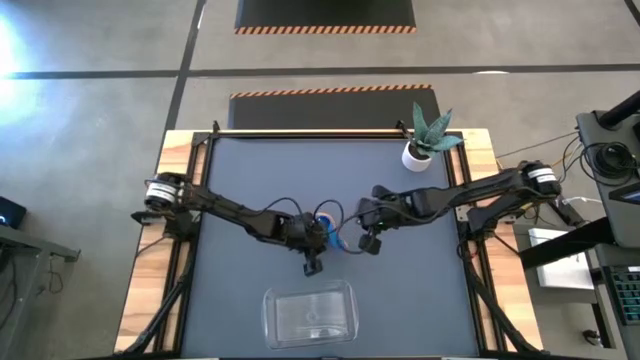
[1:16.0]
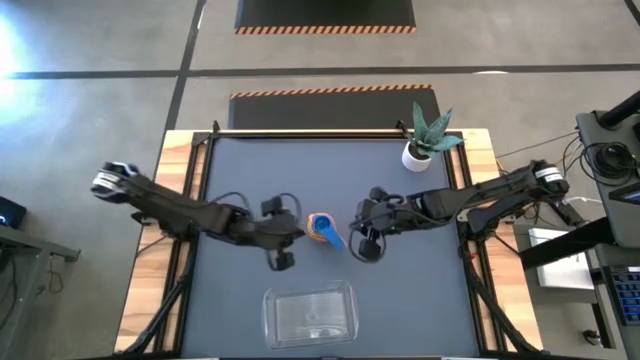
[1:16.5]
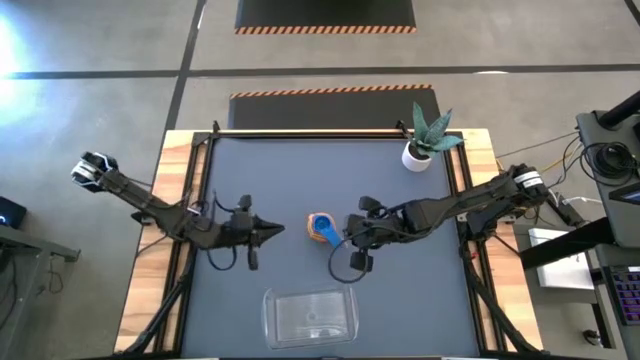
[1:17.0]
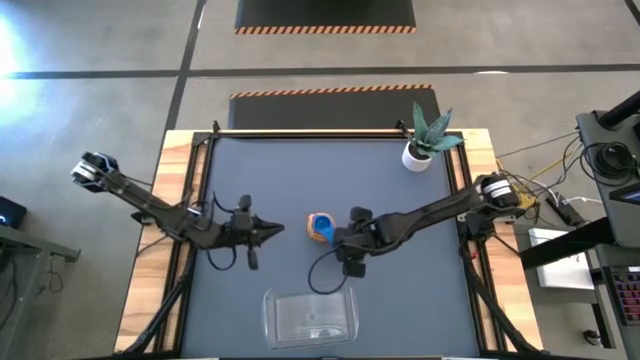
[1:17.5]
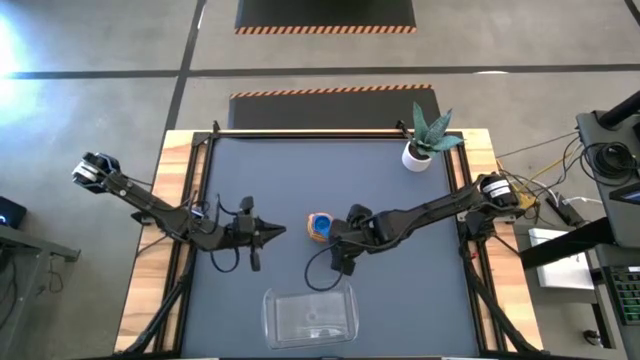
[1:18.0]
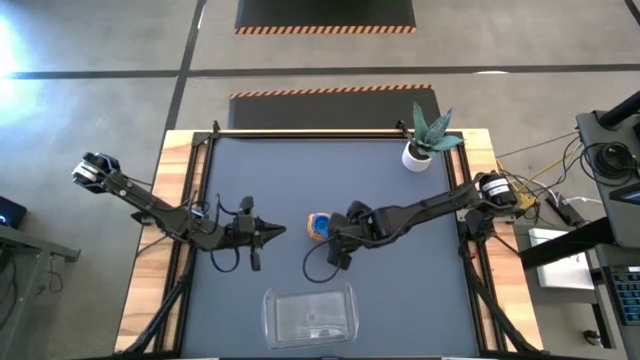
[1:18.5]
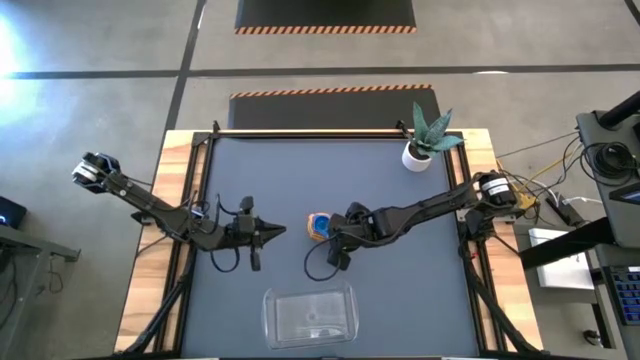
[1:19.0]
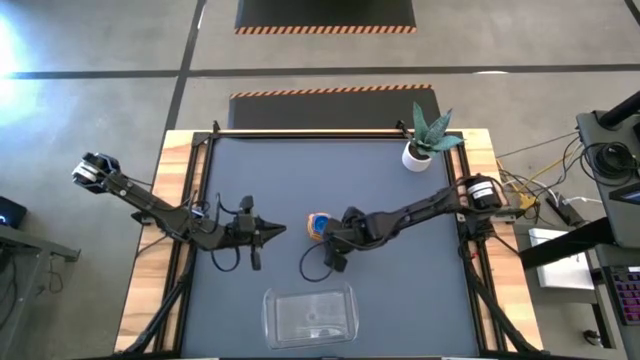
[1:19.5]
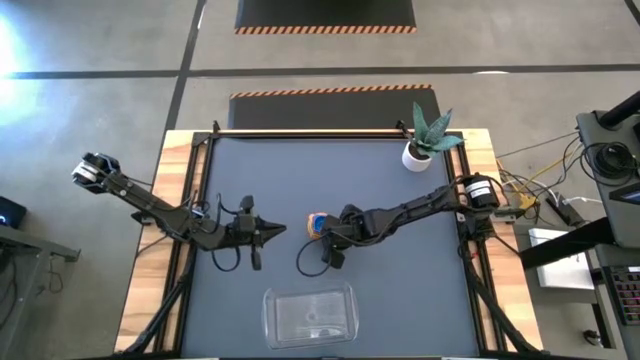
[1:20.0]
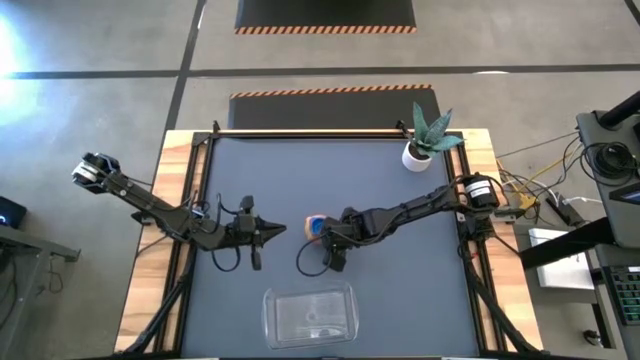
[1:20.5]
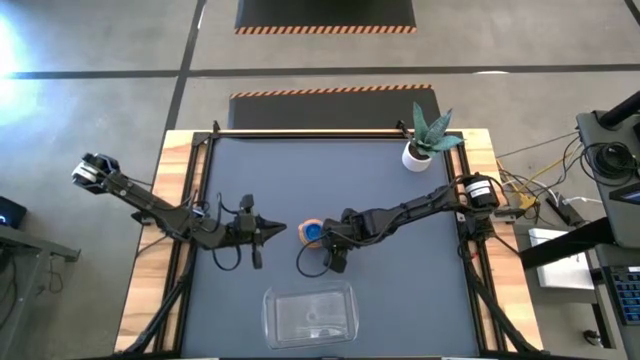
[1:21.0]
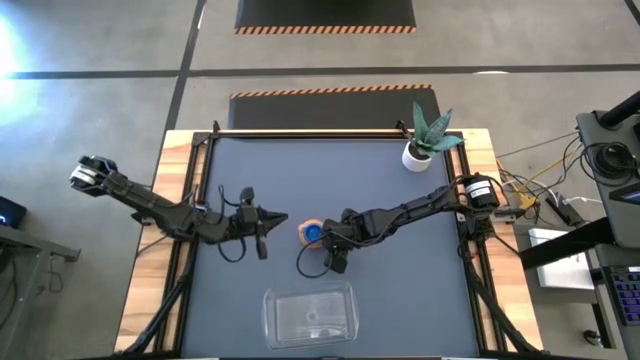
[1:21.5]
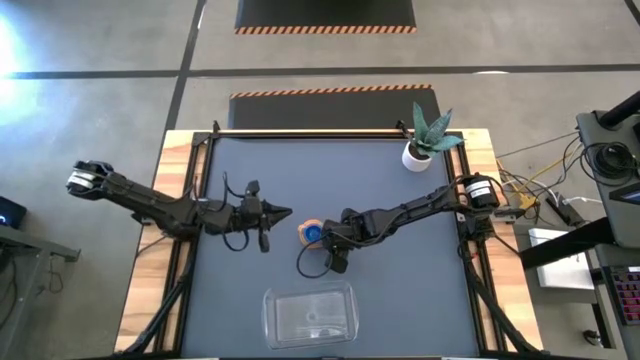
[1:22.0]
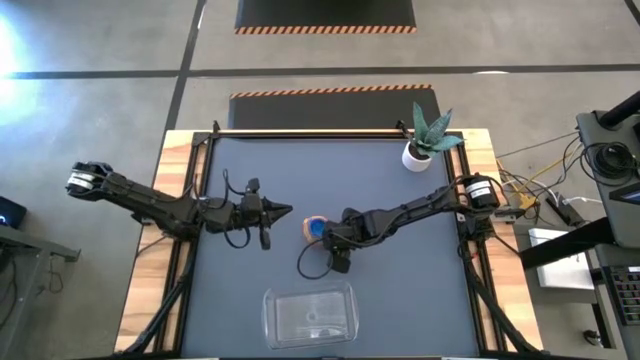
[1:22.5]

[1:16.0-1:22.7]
Task: Nest measuring cups in basket
Put the stacked measuring cups into the transparent bin

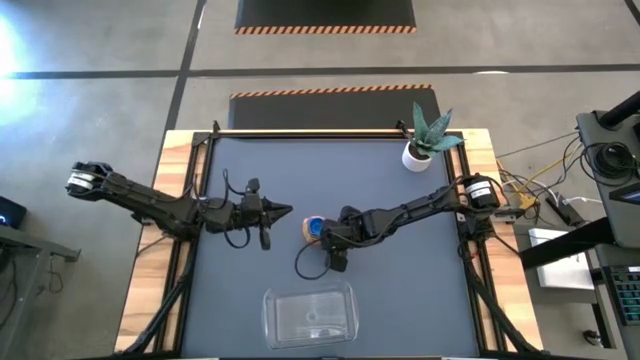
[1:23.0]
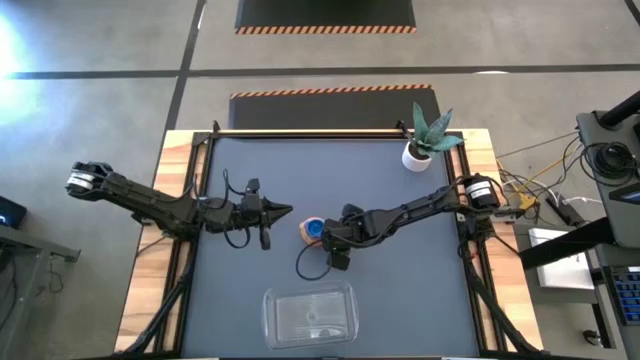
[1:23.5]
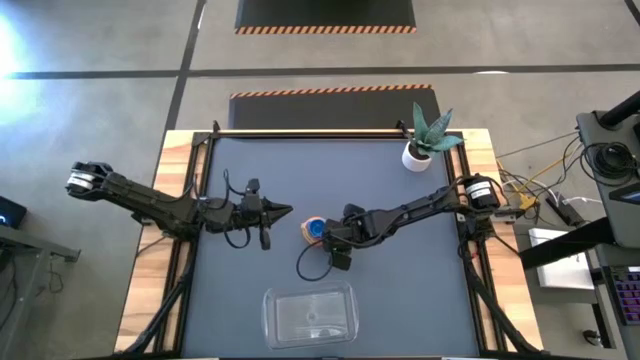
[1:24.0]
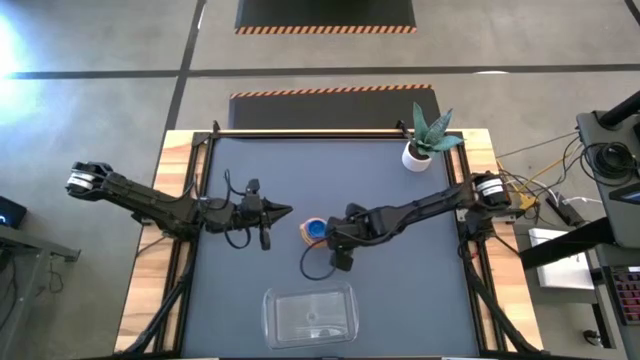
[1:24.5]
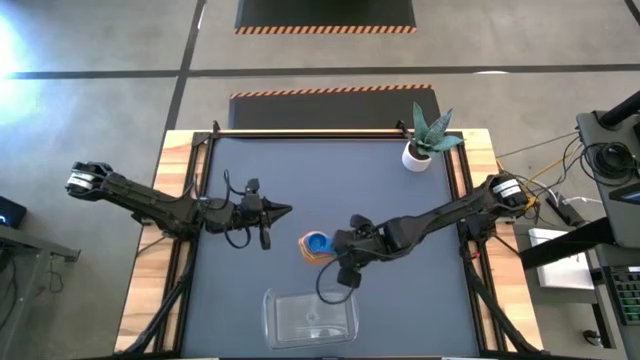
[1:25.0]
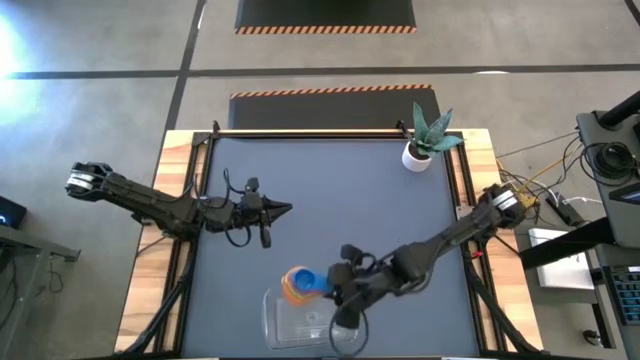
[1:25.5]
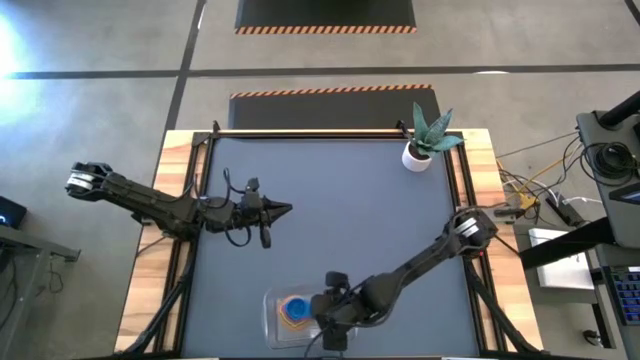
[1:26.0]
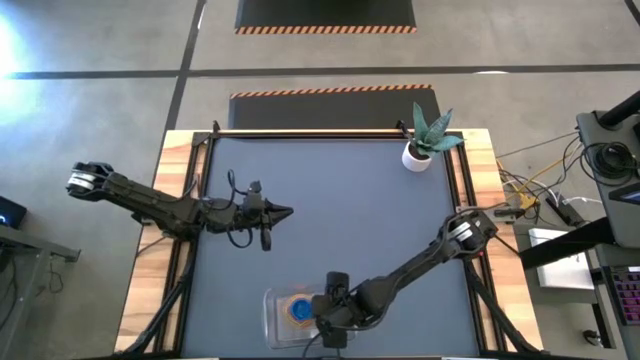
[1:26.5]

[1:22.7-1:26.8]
Put the stacked measuring cups into the transparent bin

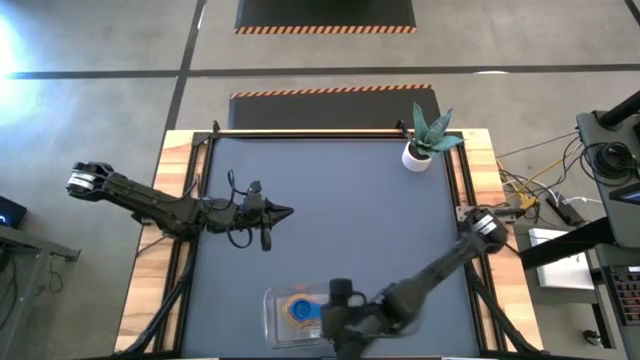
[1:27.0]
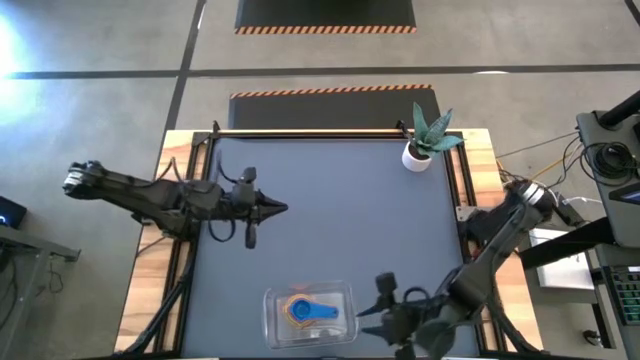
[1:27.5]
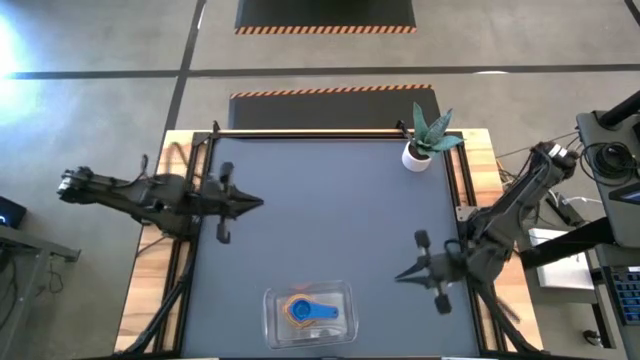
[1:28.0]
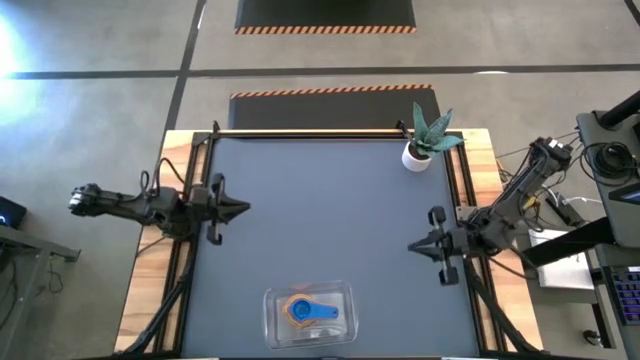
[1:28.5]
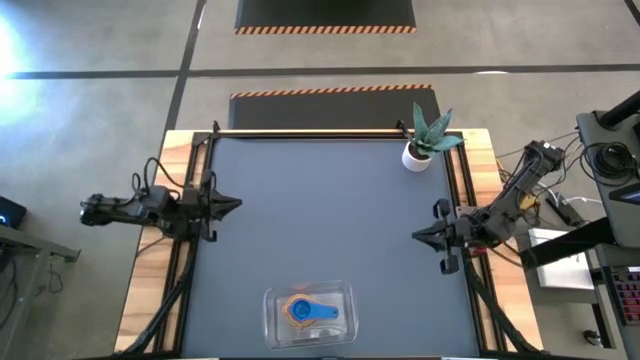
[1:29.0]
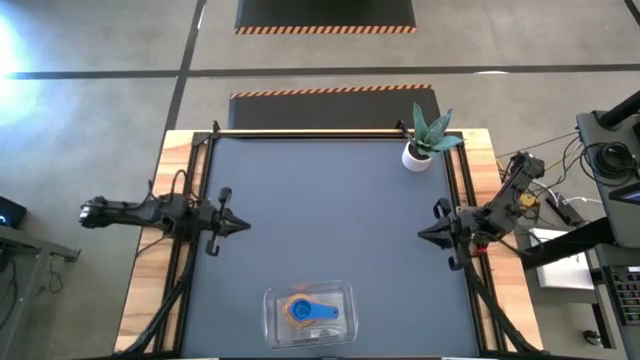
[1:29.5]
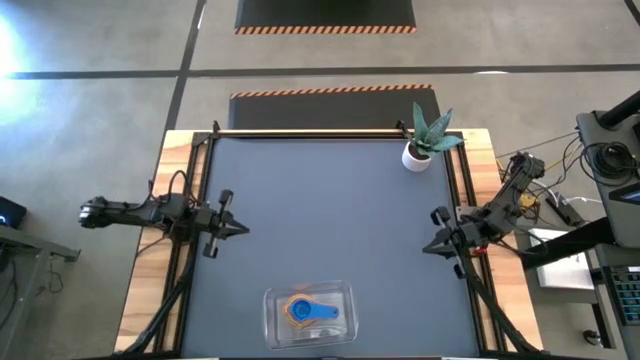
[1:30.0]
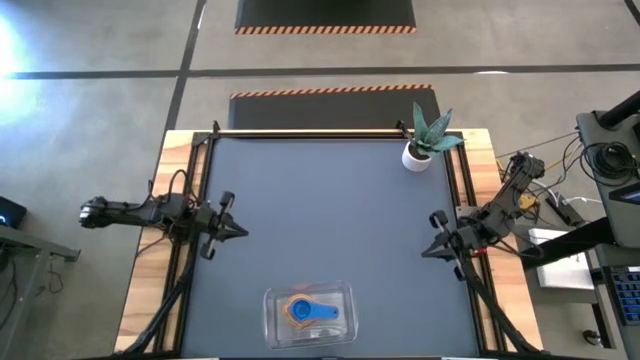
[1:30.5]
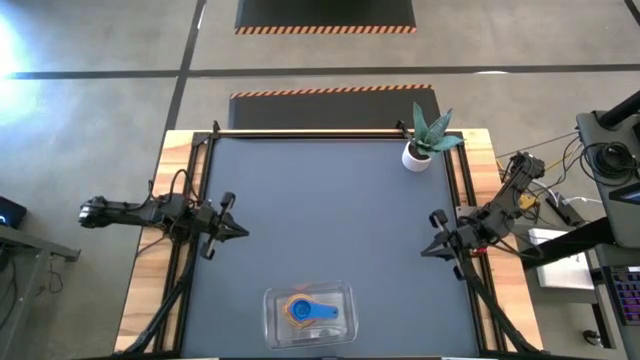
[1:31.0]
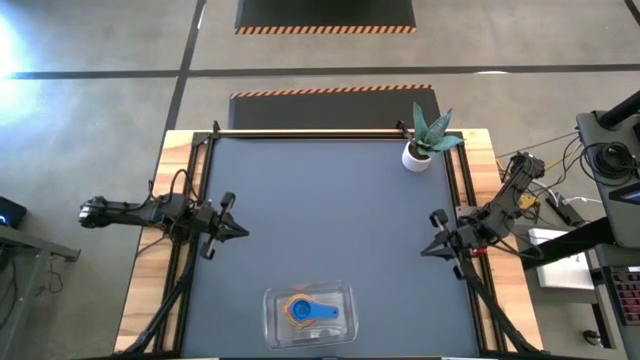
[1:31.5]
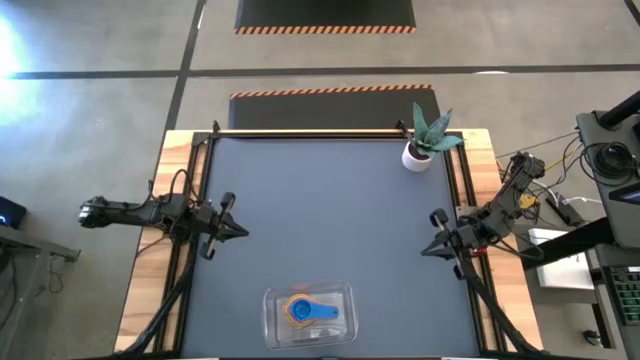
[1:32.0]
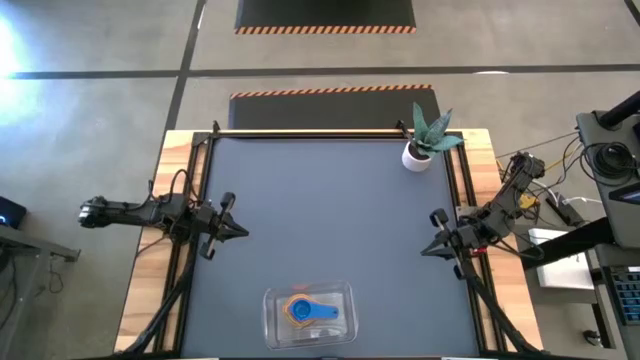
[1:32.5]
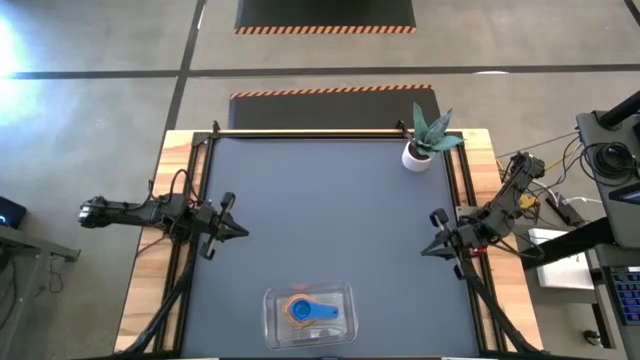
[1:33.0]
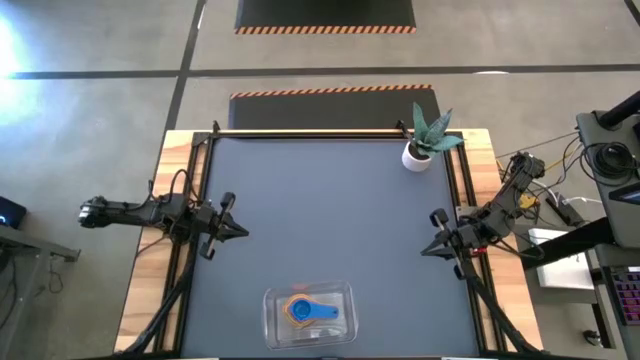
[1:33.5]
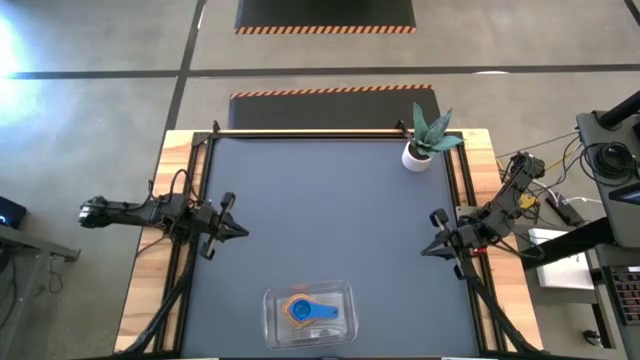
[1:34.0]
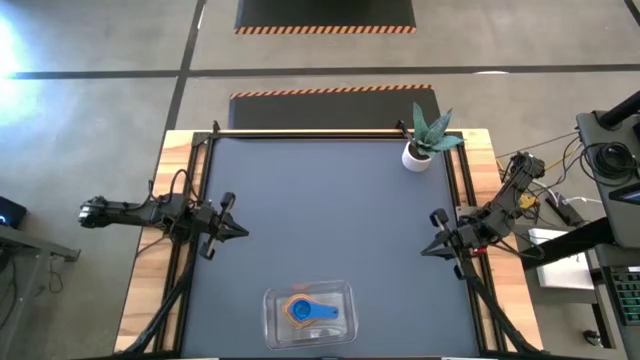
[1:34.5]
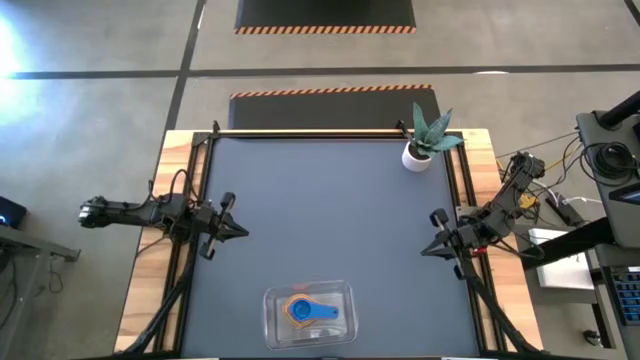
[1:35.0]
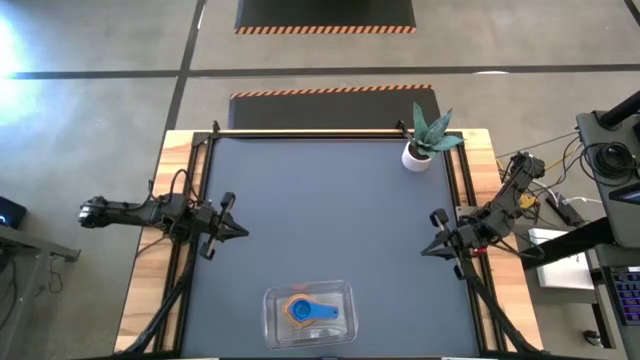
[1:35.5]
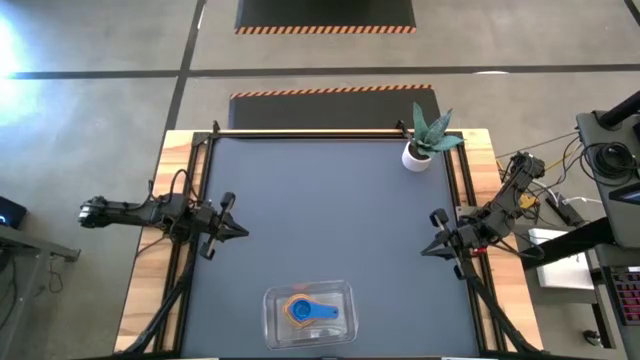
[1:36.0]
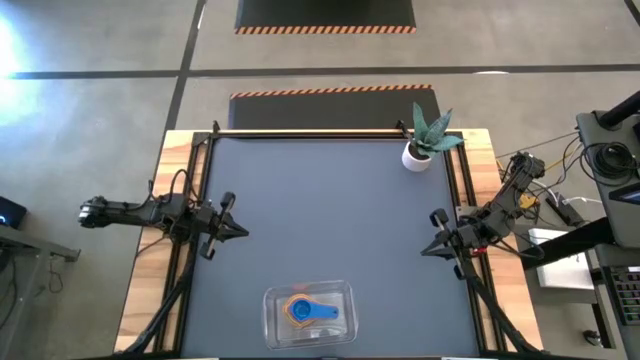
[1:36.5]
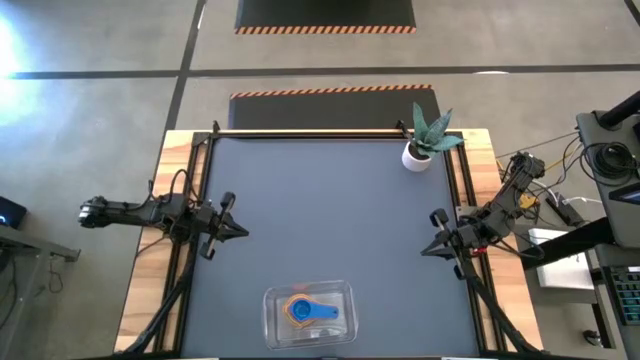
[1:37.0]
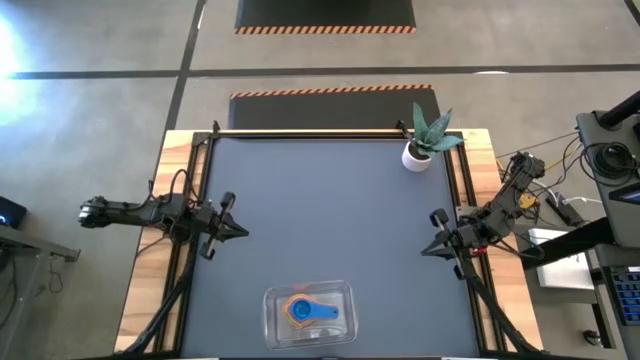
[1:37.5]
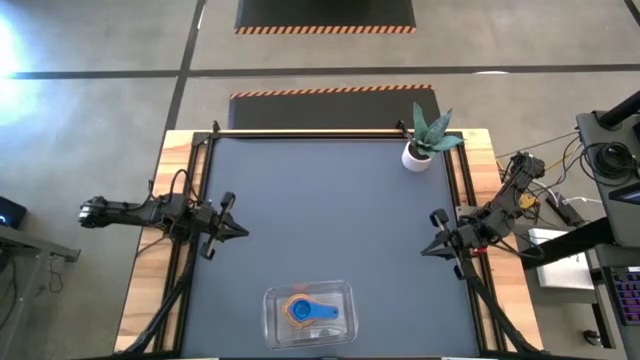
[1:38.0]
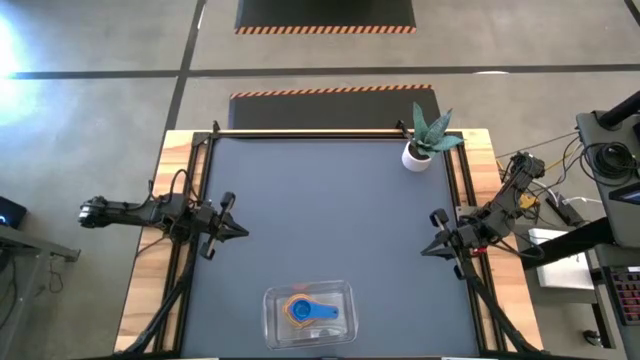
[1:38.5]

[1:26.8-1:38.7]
Return to Home Position
